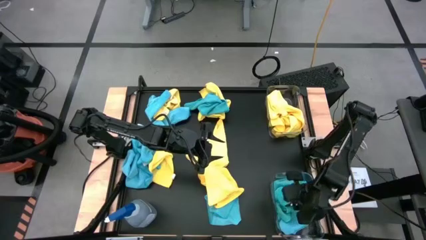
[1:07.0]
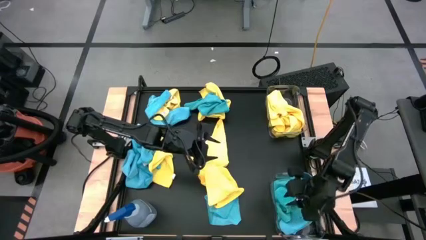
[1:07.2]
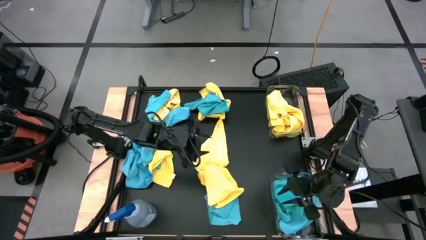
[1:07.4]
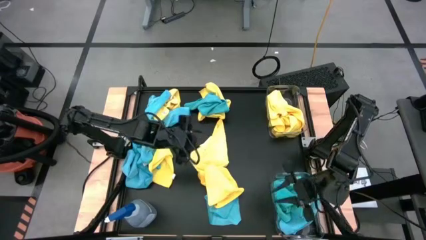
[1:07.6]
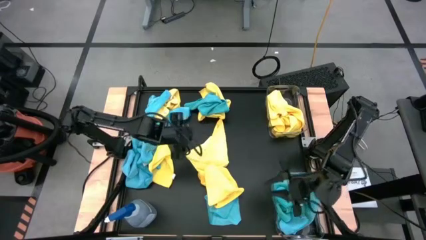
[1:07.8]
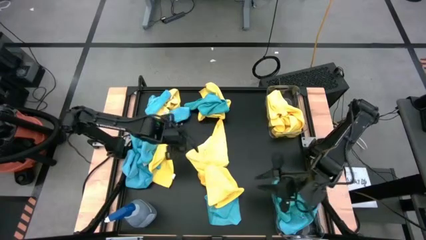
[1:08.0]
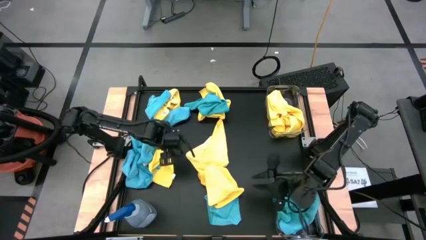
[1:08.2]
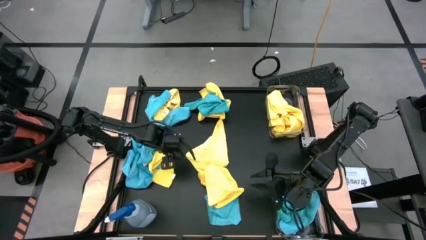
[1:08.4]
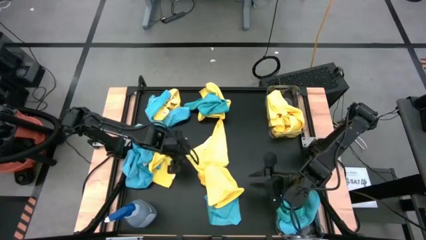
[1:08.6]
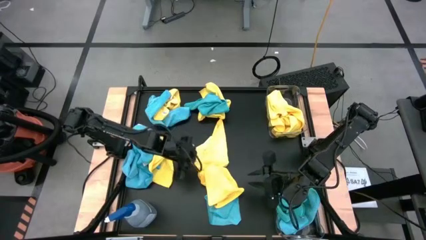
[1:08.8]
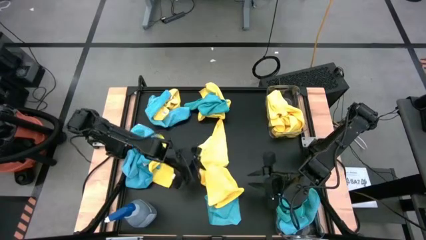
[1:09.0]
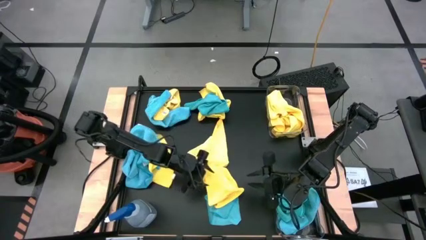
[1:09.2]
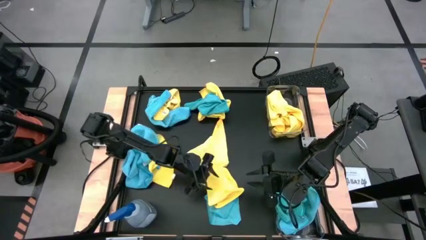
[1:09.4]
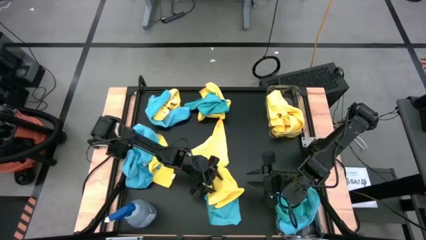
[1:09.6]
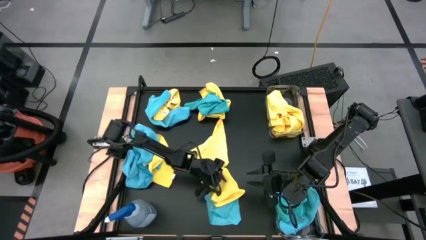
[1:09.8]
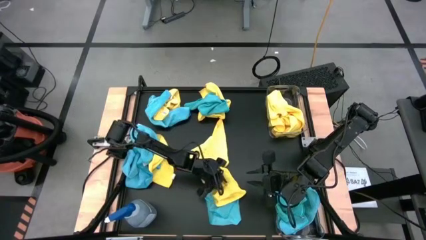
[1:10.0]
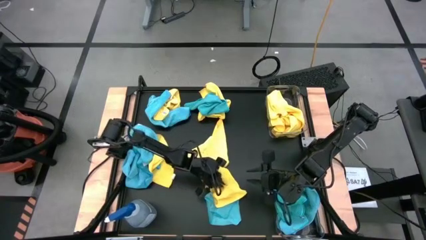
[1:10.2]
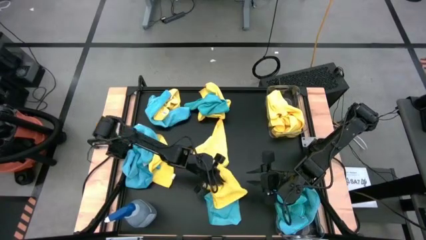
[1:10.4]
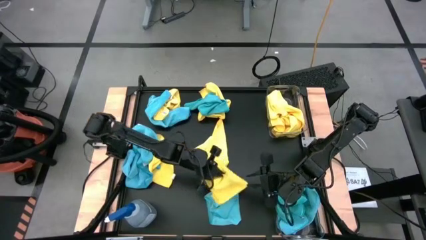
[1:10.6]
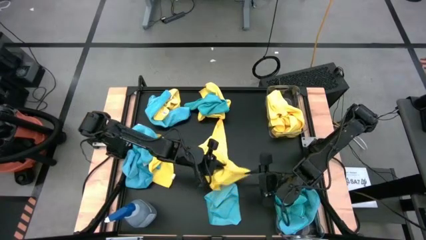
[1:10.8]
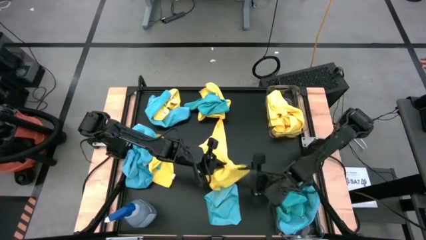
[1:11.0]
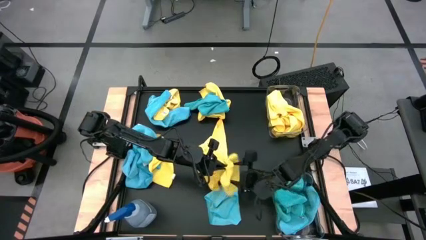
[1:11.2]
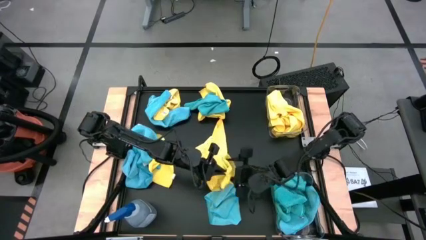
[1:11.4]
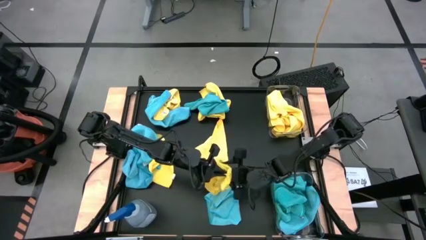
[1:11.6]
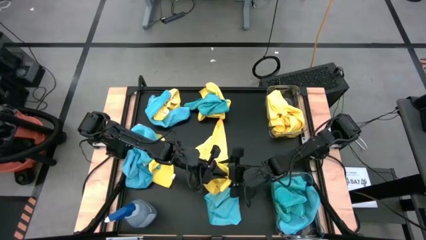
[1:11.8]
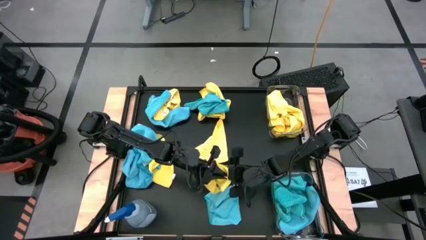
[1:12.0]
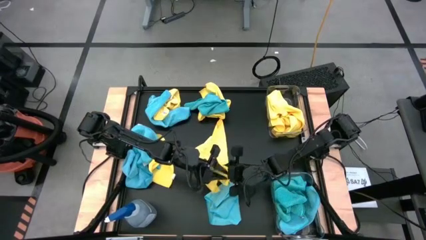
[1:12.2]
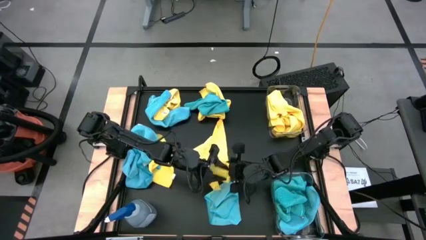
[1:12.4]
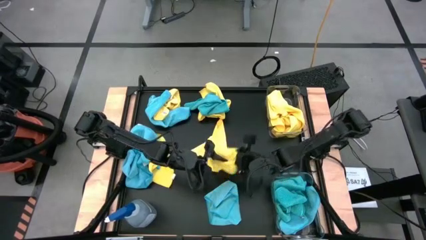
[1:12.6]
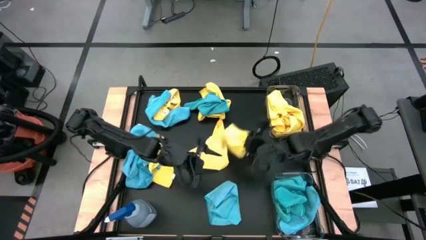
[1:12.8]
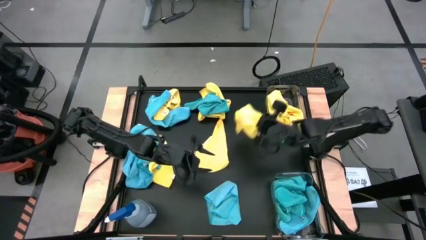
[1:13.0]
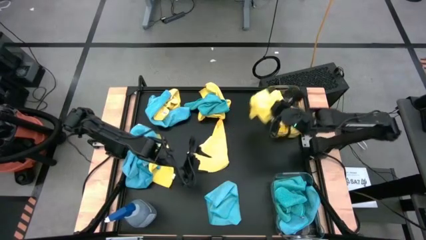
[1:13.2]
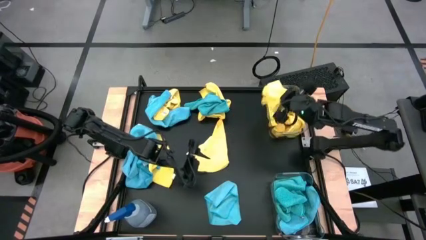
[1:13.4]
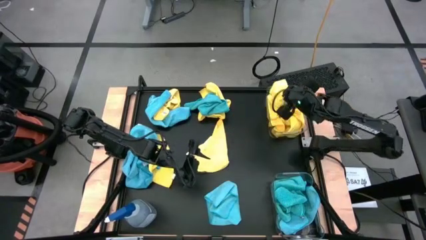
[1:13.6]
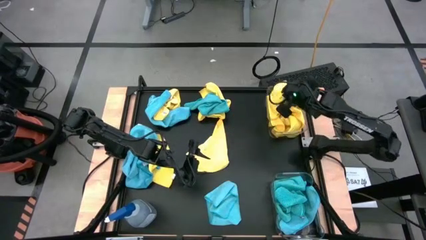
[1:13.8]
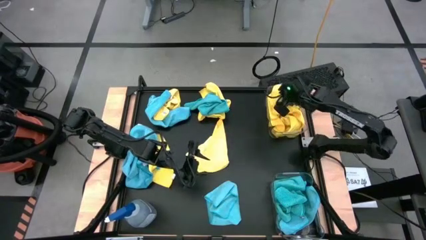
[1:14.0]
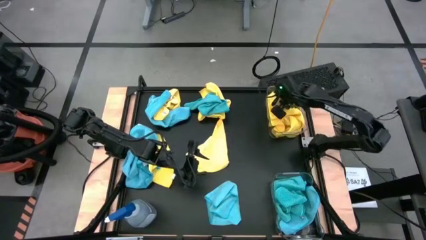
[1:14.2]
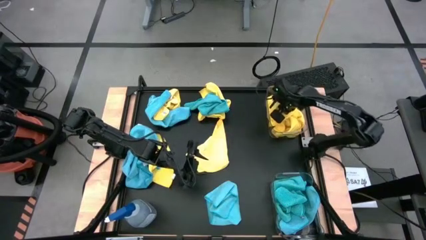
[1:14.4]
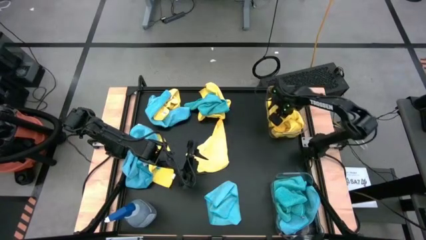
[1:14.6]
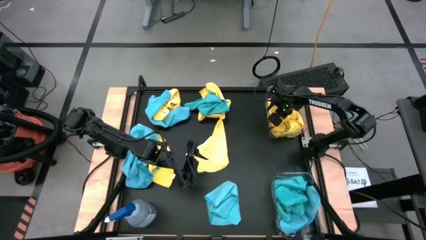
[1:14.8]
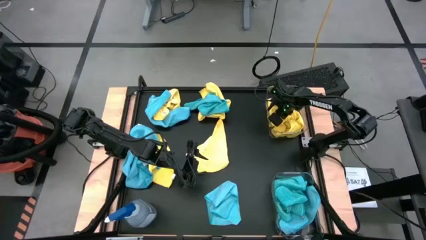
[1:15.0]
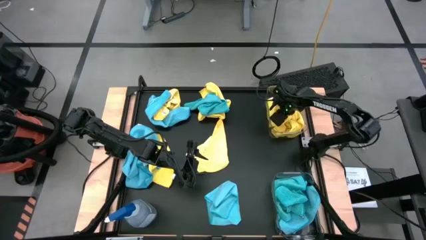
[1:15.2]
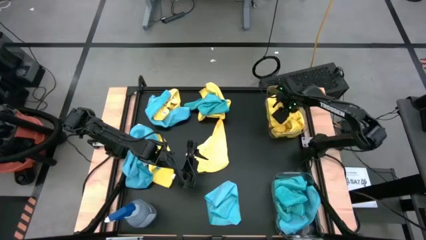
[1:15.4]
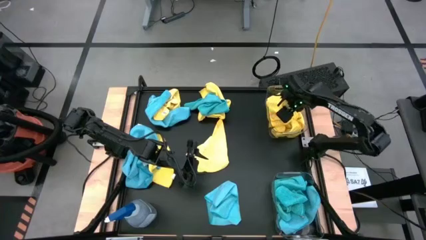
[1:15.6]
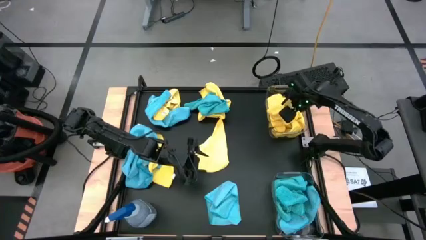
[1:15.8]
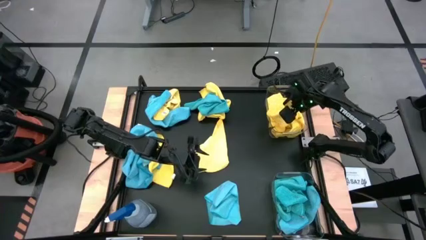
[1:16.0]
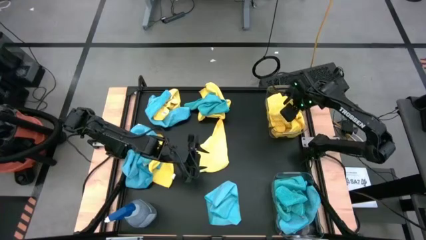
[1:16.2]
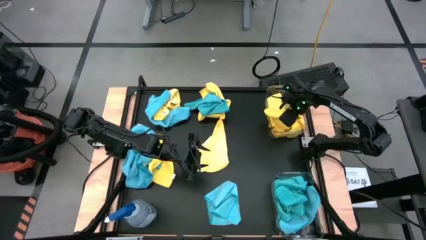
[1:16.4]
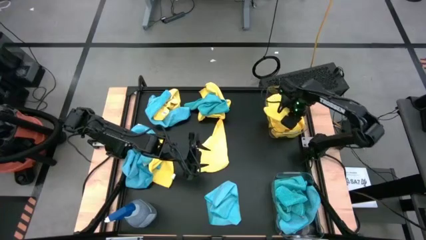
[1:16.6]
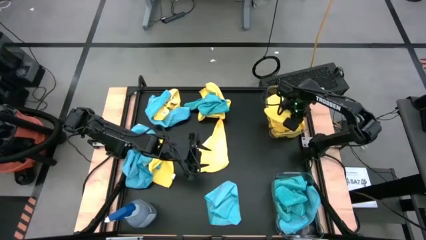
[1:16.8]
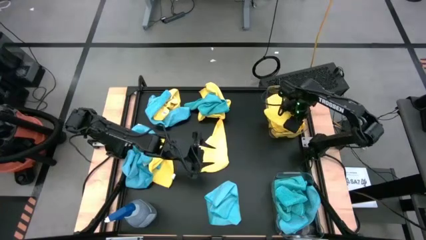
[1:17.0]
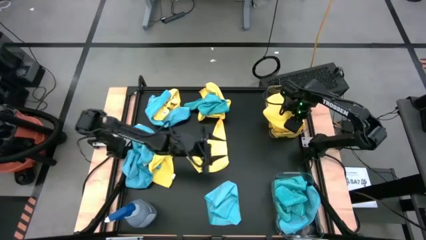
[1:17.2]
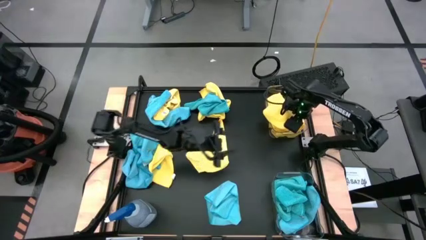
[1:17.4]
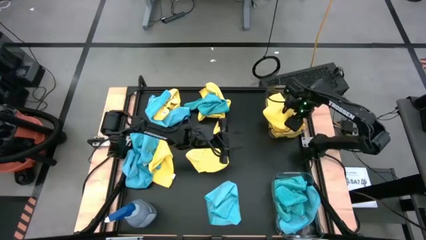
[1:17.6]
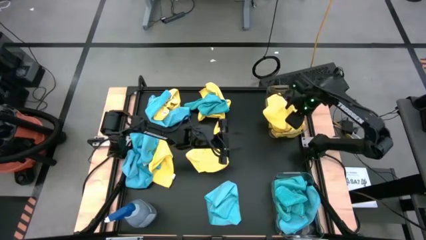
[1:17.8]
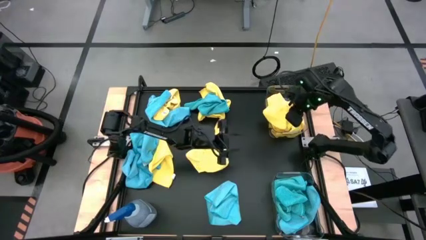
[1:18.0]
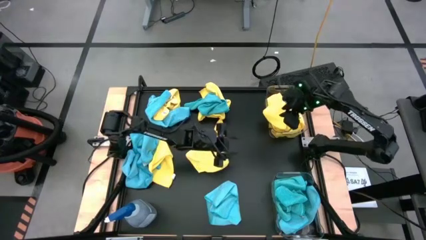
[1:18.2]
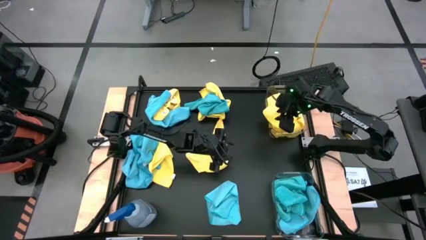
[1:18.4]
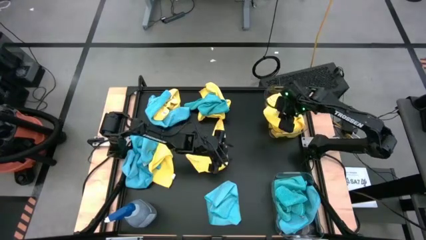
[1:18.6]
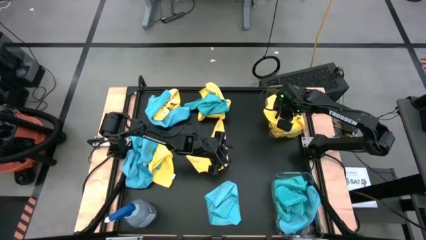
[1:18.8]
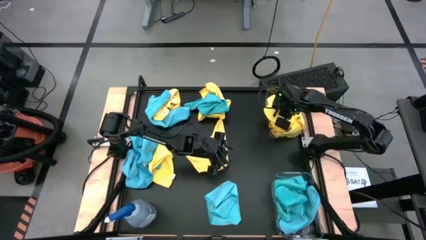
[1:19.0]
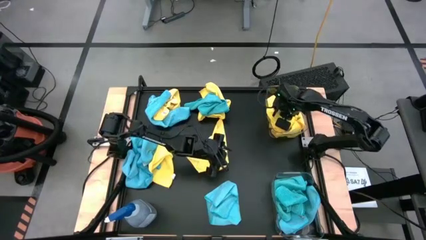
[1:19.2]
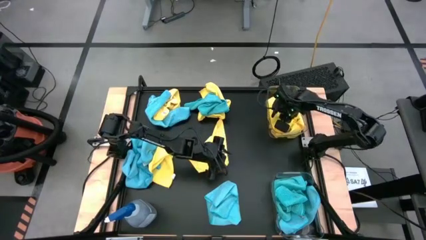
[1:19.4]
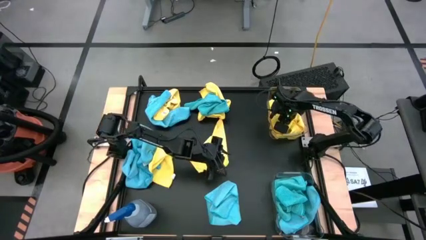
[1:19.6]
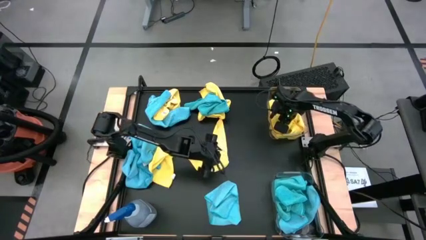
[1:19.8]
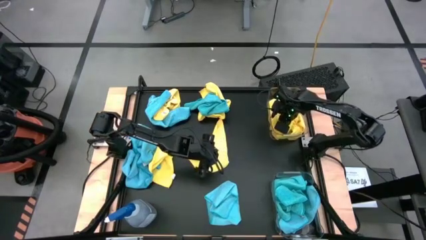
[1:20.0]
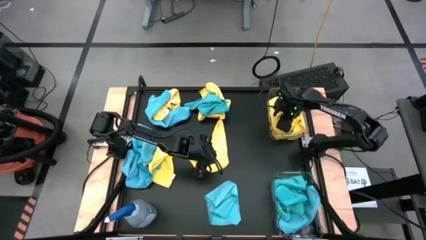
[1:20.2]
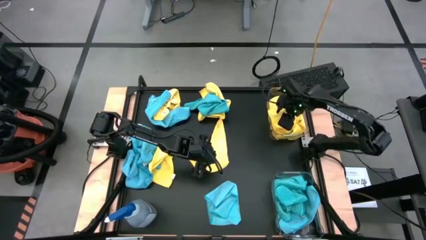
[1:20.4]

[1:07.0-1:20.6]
Task: Sort microfiber towel by color & place in baskets
Put the yellow towel into the top transparent bin

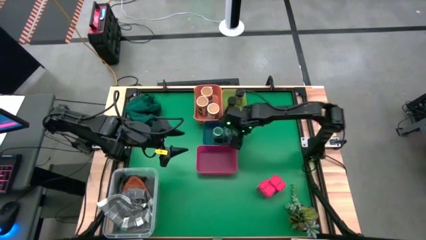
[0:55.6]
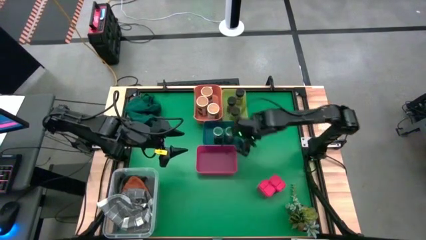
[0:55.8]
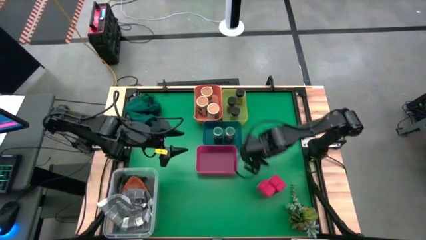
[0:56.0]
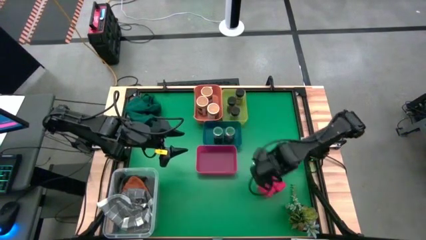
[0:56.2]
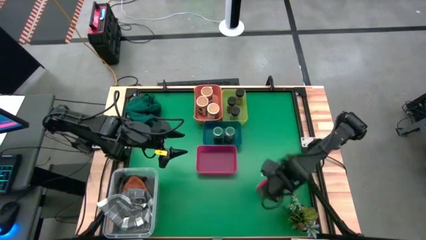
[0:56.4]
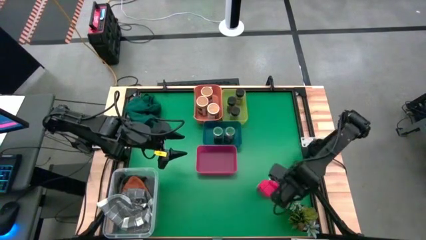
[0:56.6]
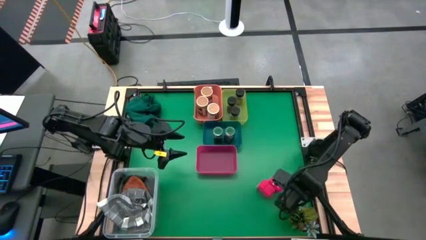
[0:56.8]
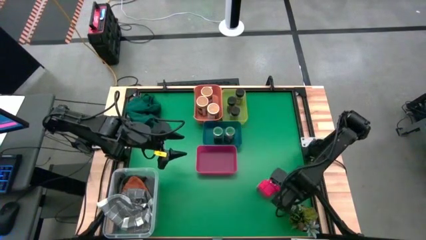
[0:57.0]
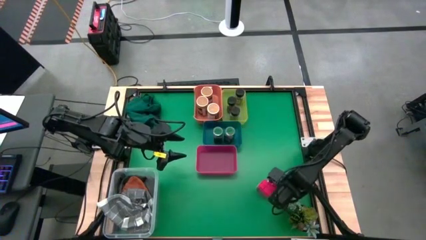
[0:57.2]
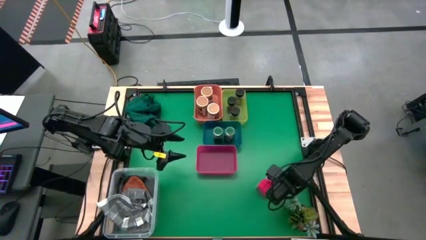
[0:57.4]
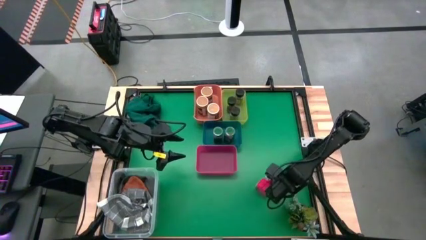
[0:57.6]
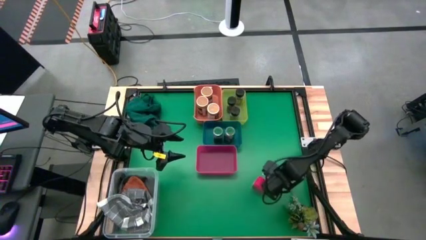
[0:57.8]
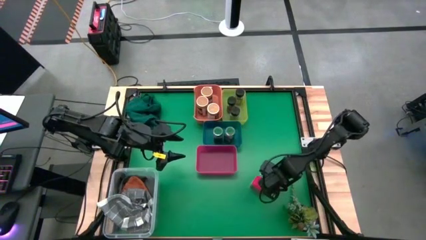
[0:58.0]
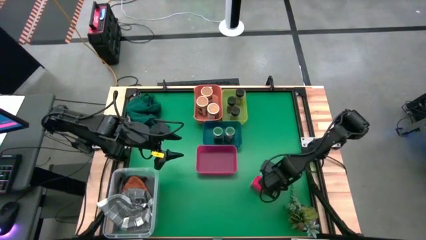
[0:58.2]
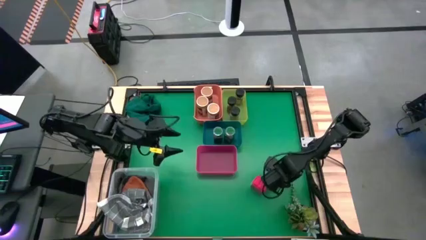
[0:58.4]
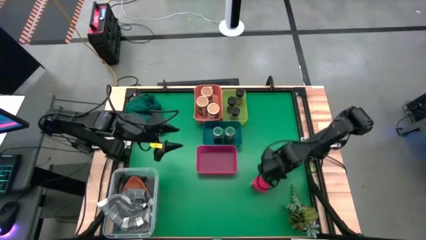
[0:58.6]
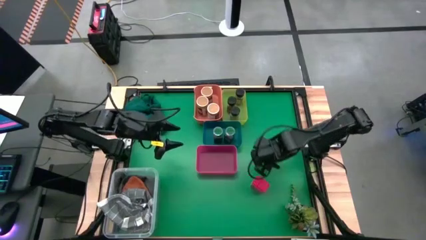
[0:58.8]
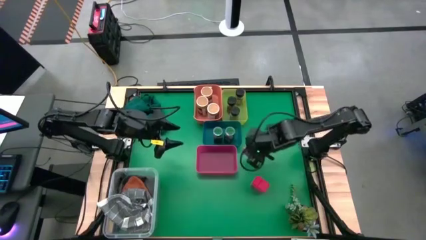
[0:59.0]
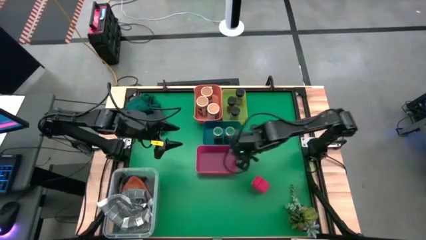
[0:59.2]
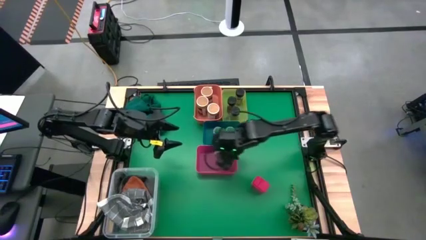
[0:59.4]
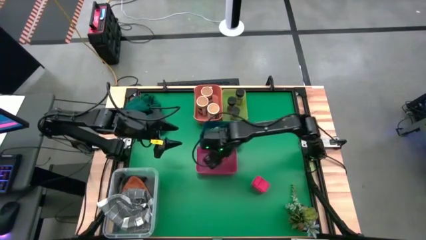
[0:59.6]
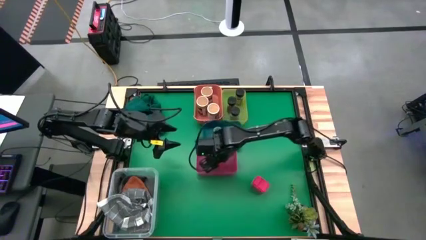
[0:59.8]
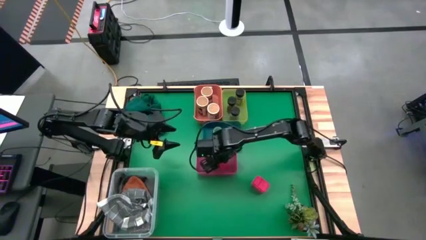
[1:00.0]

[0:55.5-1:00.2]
Task: Sort spices by type
Put the right red seasoning can into the red bin
